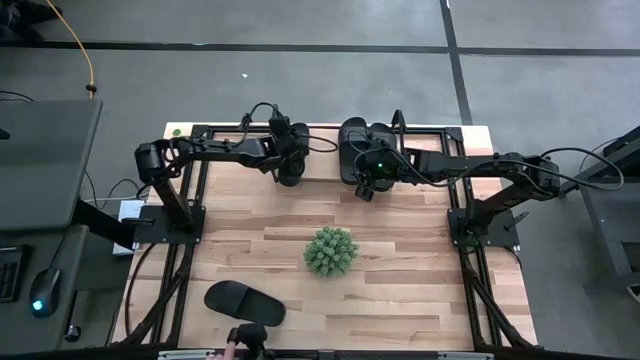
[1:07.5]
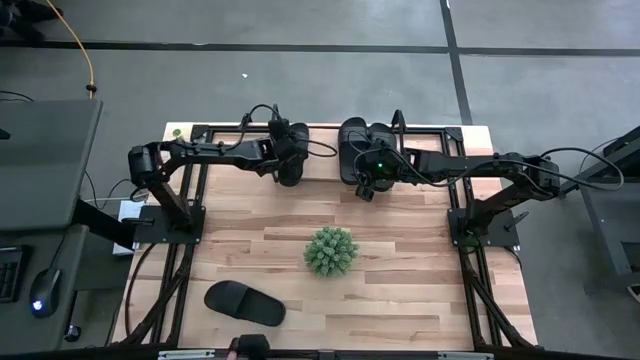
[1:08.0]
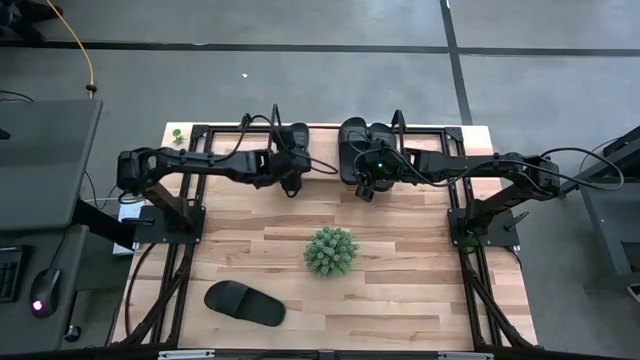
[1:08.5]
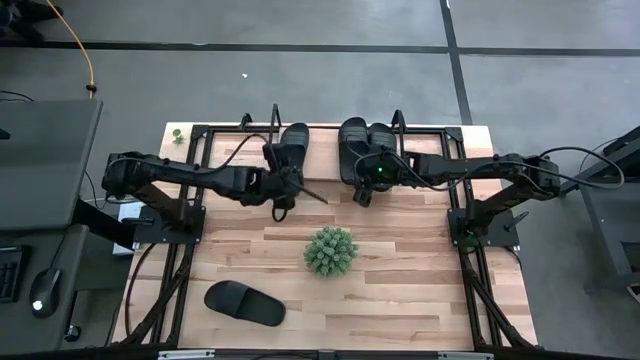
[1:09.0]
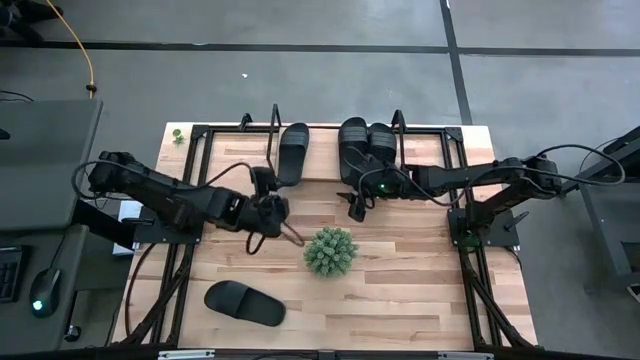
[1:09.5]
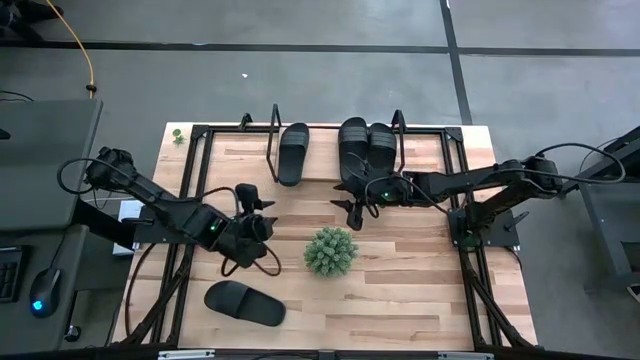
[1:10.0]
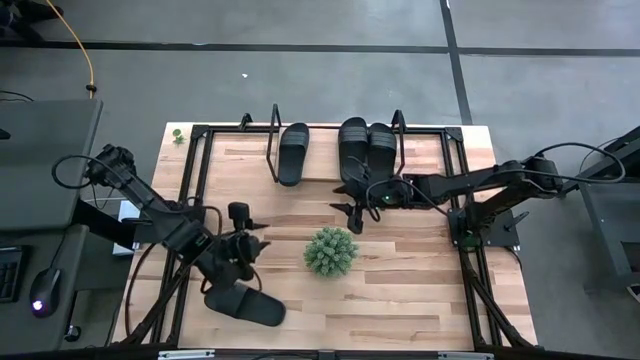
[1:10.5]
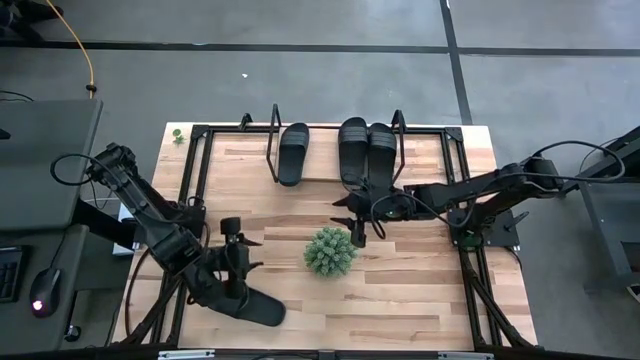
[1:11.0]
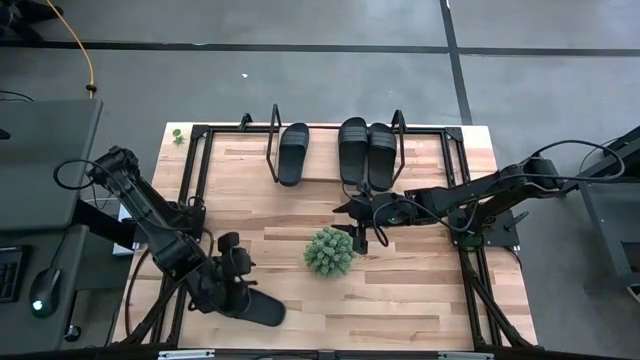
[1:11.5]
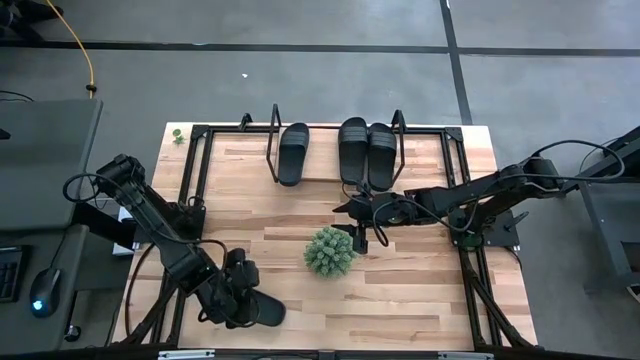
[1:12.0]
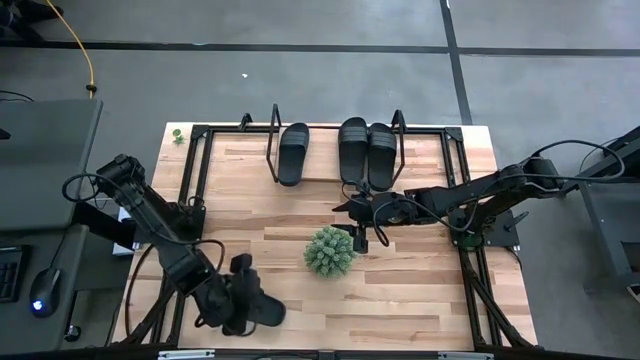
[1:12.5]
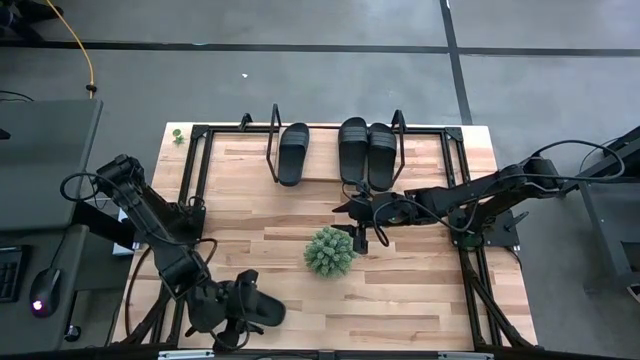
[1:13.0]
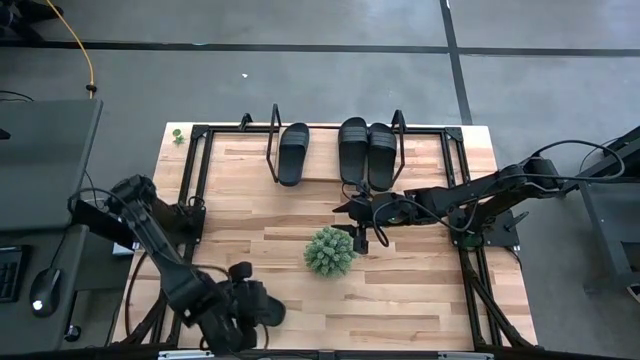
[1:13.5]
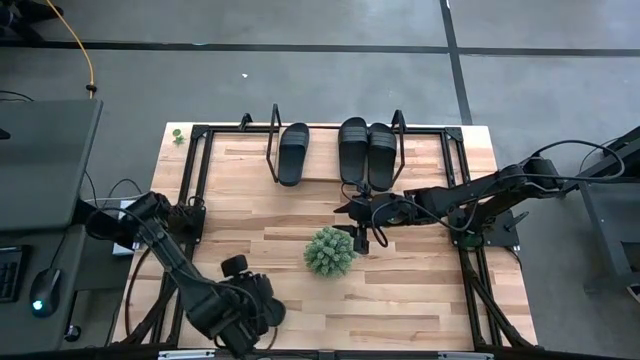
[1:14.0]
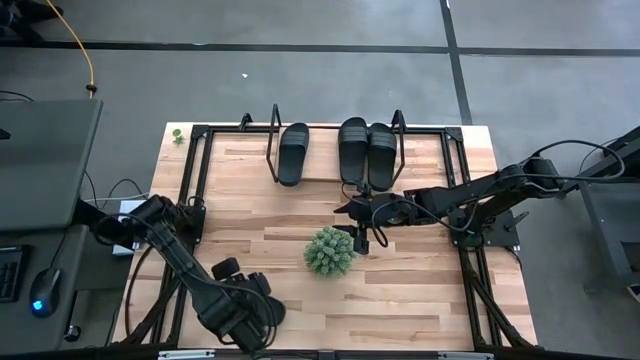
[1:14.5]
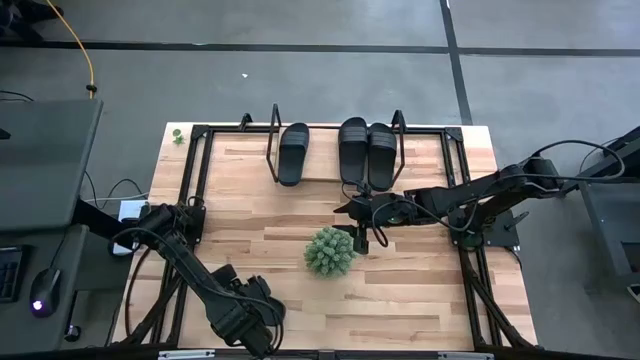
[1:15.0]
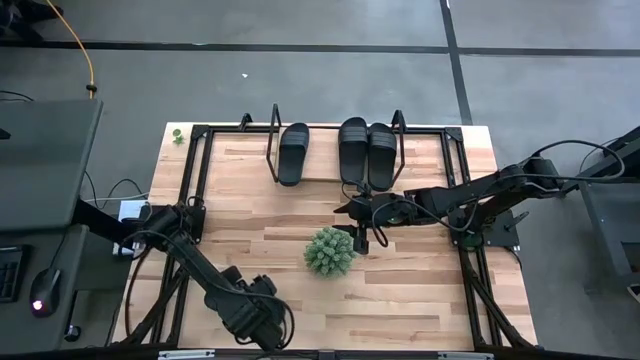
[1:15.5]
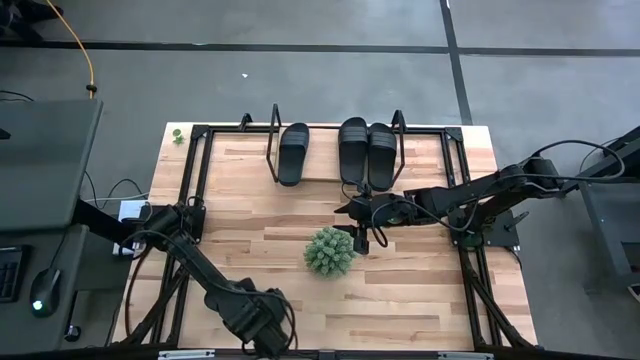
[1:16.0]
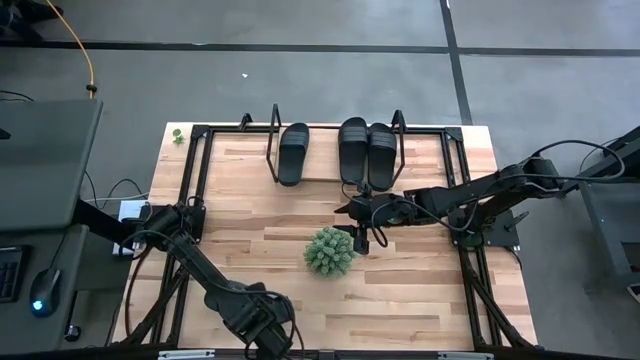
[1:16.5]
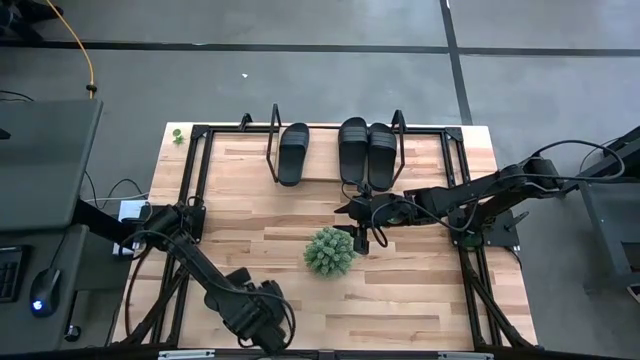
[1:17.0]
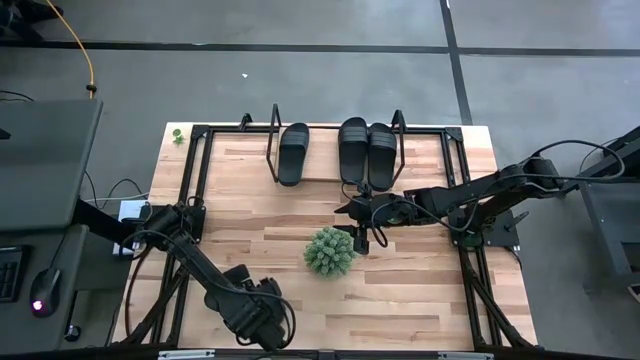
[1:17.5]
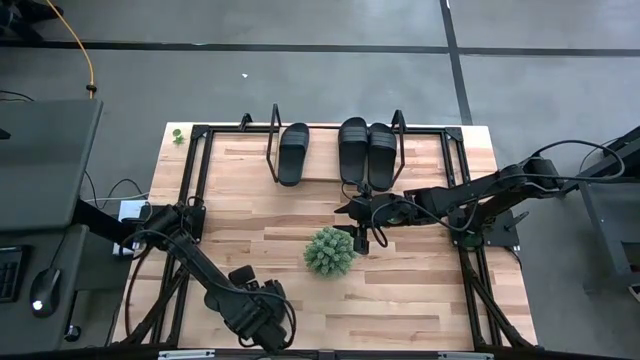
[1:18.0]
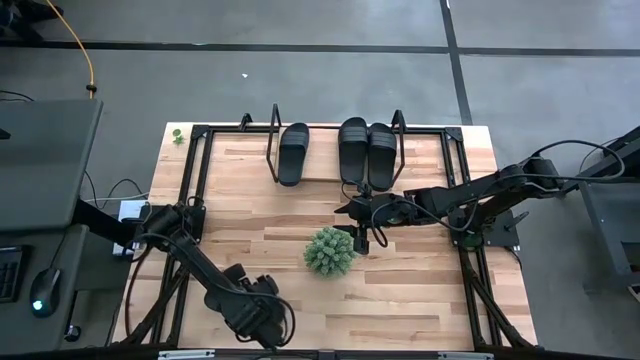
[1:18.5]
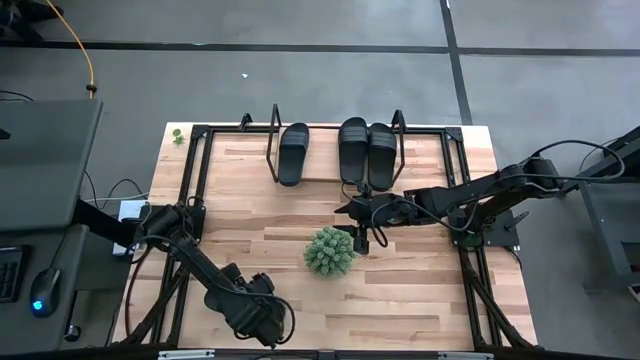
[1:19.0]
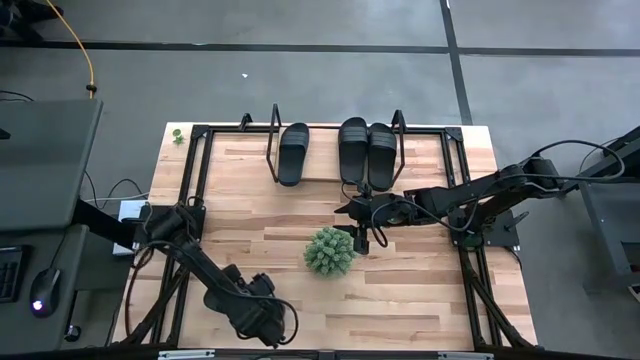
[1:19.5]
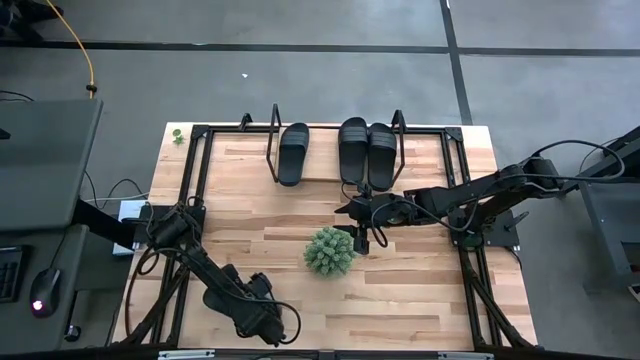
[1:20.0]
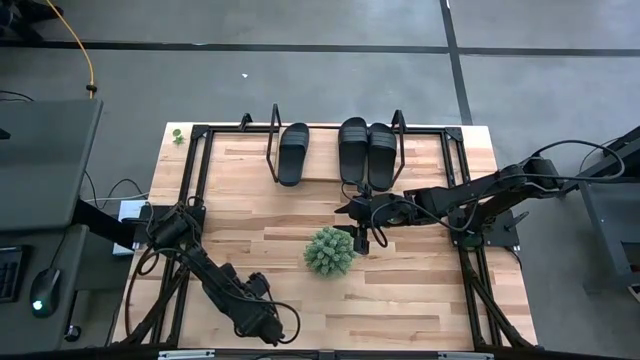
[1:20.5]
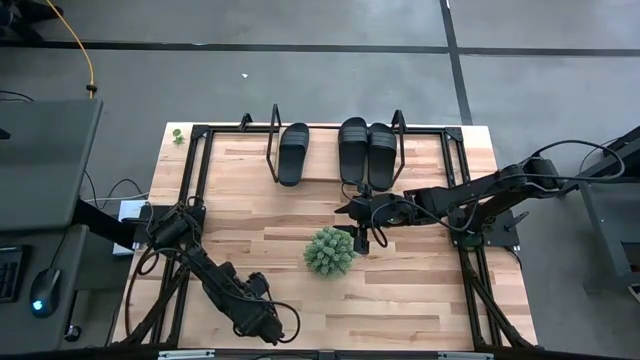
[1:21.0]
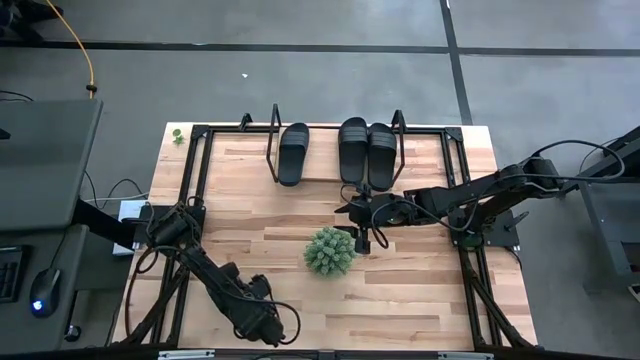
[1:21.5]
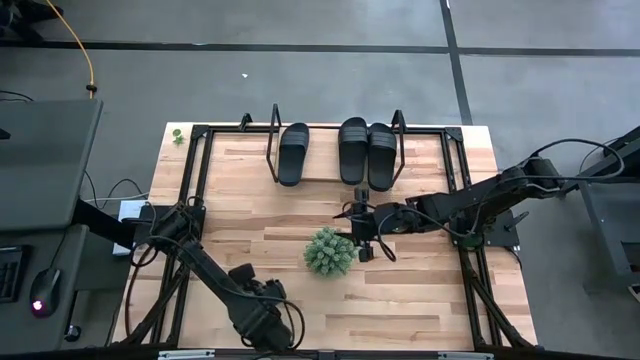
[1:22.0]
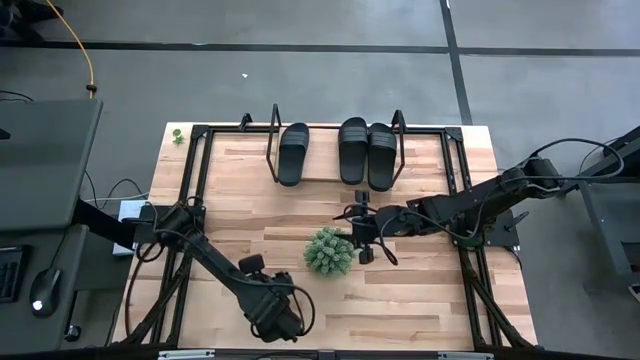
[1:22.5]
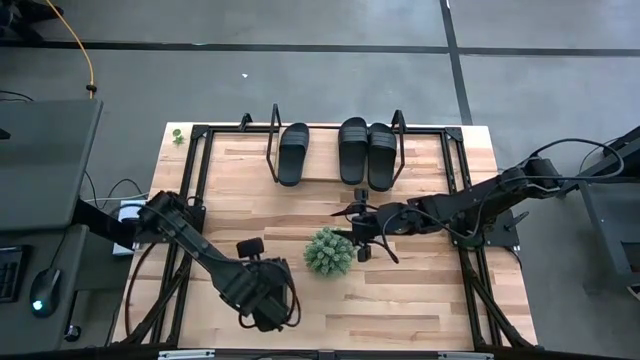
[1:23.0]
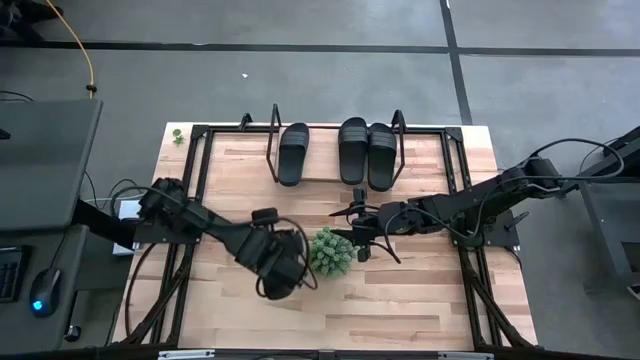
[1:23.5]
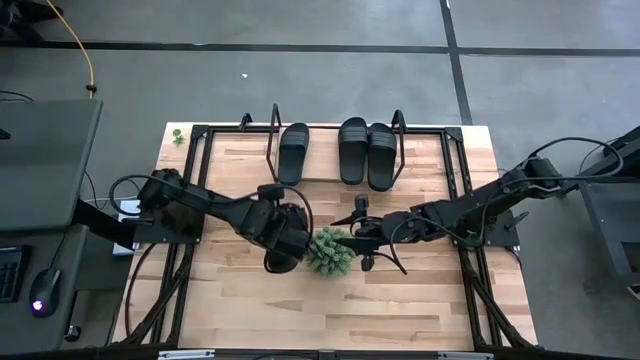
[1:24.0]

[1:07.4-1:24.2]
Task: Pick and place slides into the shelf
Put the black slide on the shelf

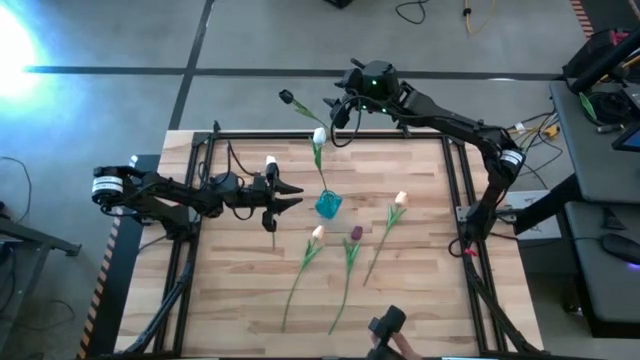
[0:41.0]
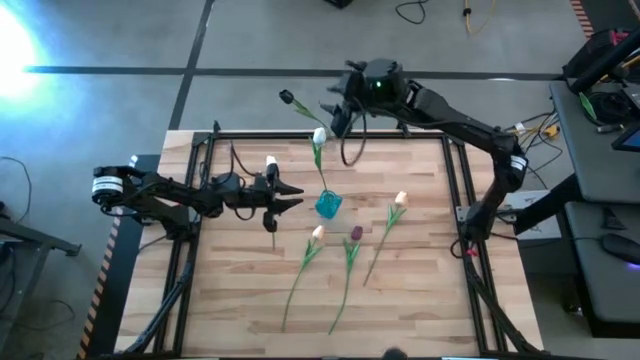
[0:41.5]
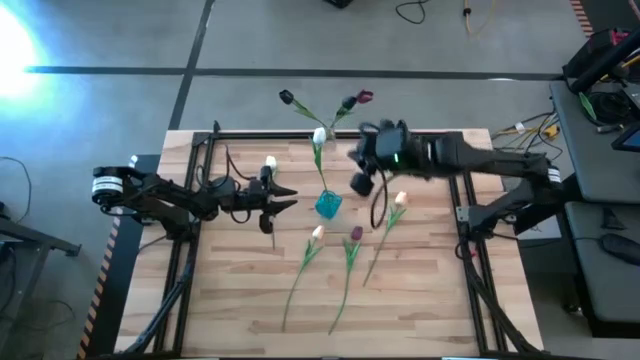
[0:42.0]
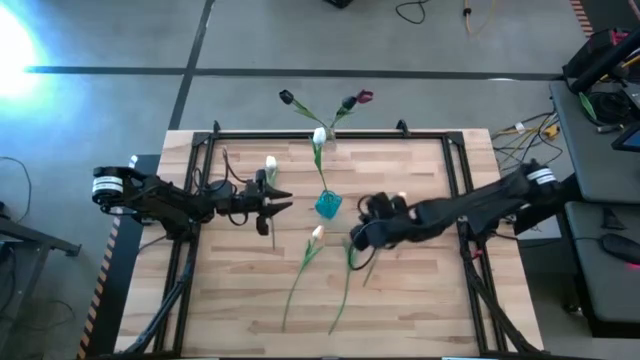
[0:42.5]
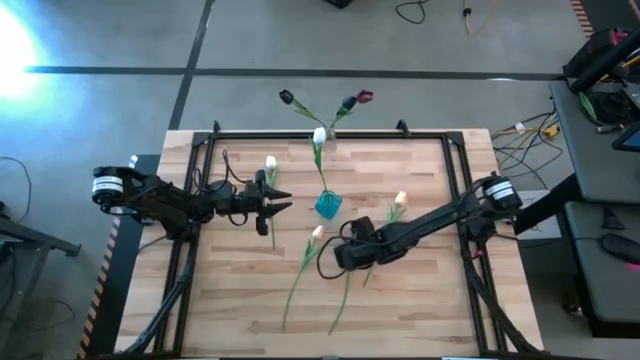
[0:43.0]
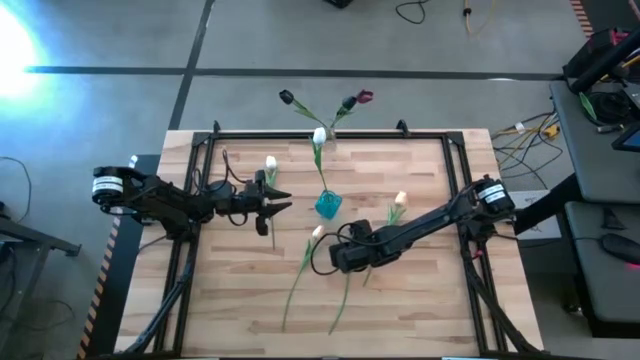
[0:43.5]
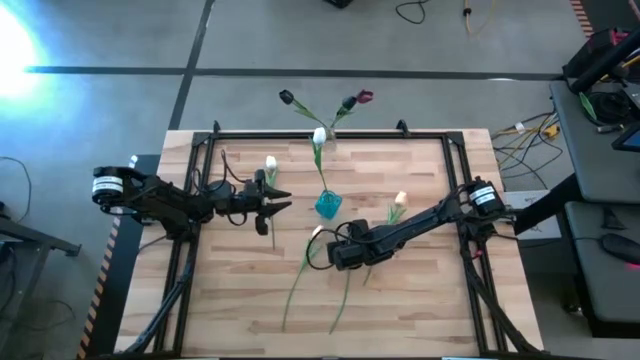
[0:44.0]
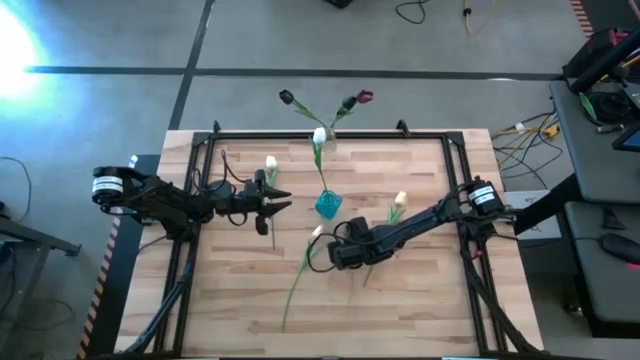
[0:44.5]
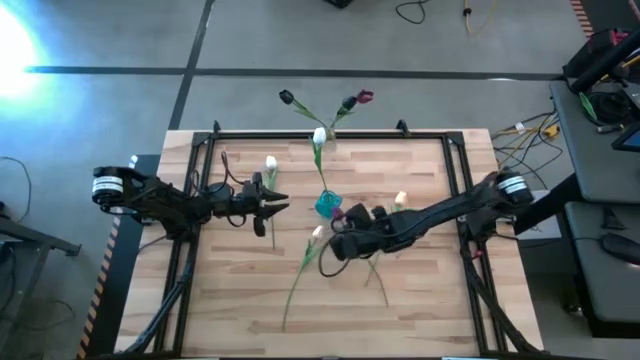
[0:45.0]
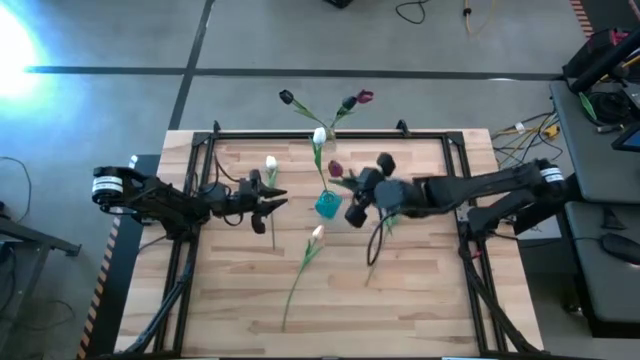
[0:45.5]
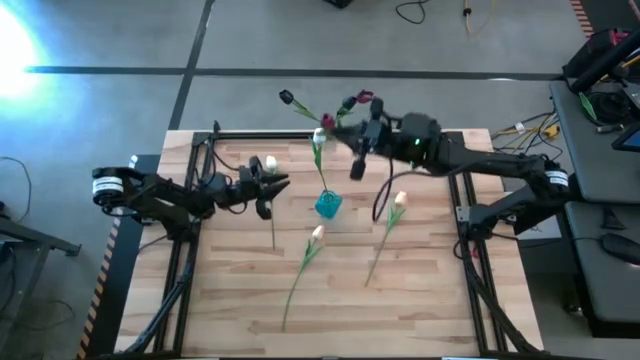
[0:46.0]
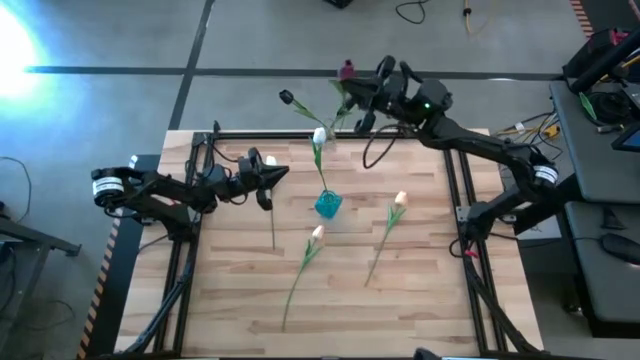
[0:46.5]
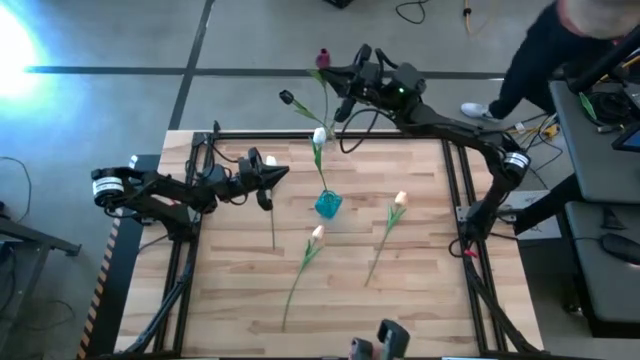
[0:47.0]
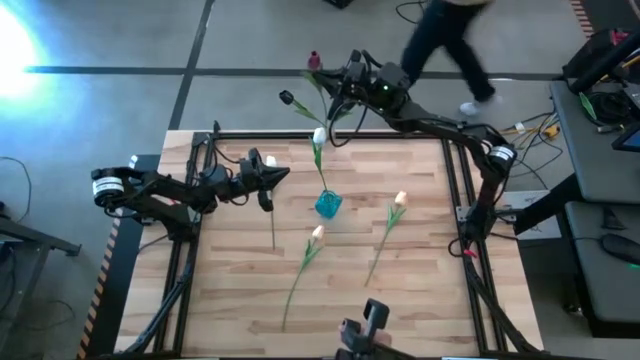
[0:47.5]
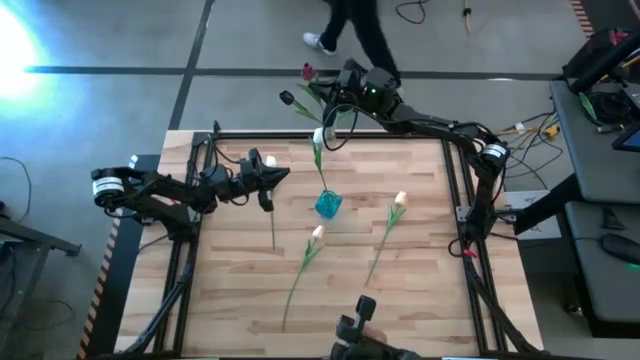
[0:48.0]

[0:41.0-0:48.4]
Task: Sort flowers into vase by color
Put the red tulip into the transparent vase
